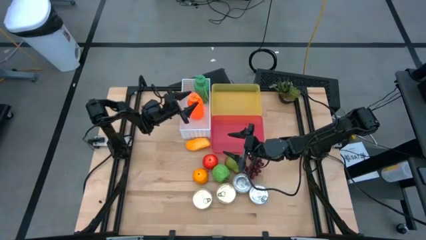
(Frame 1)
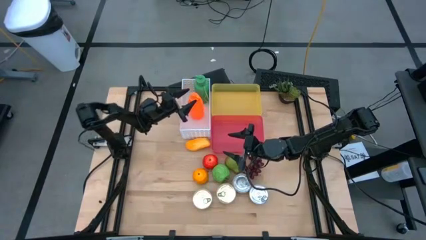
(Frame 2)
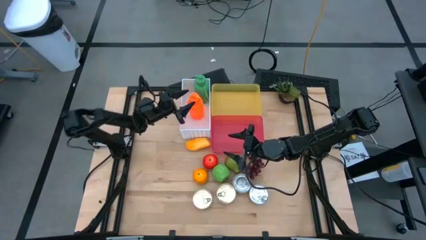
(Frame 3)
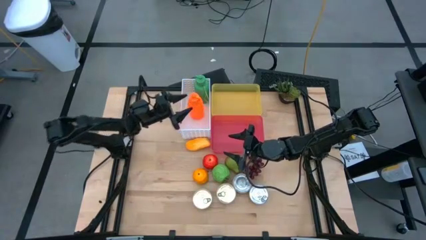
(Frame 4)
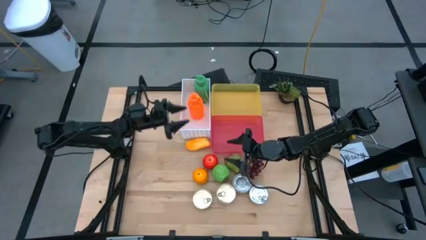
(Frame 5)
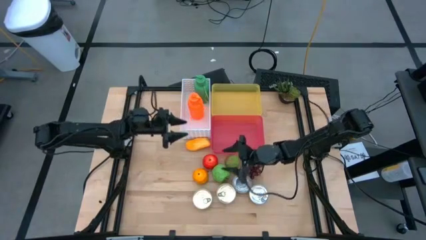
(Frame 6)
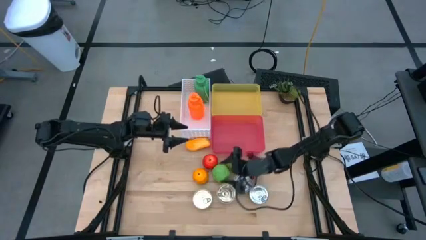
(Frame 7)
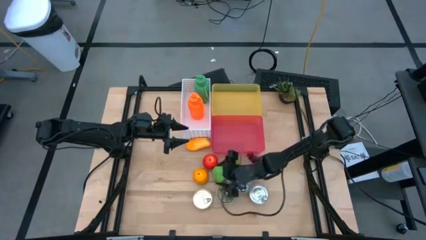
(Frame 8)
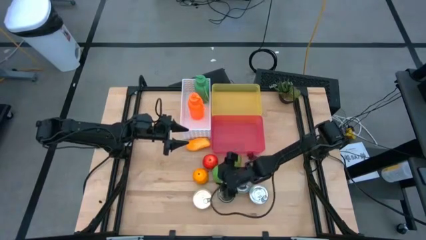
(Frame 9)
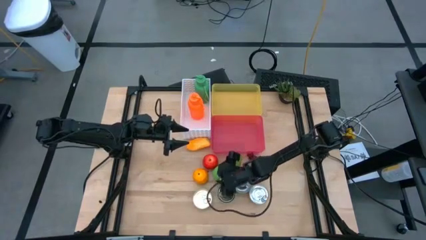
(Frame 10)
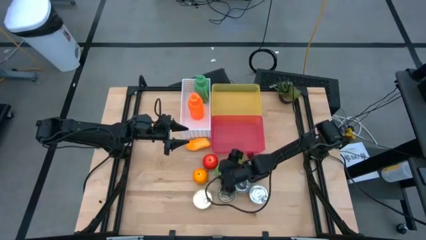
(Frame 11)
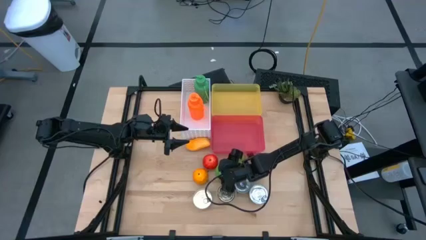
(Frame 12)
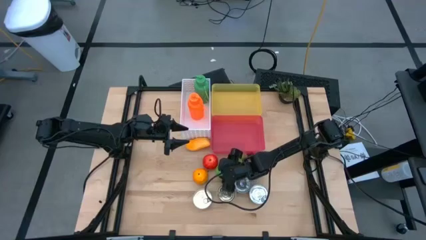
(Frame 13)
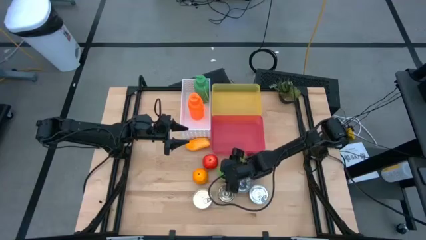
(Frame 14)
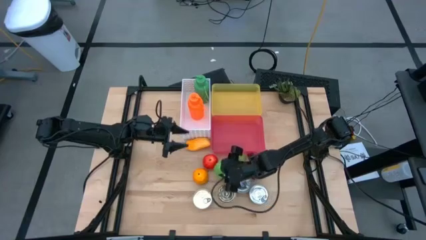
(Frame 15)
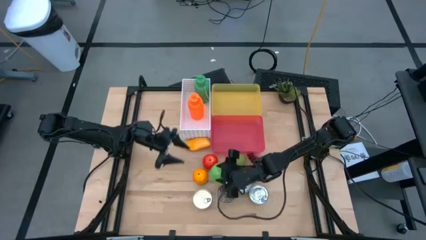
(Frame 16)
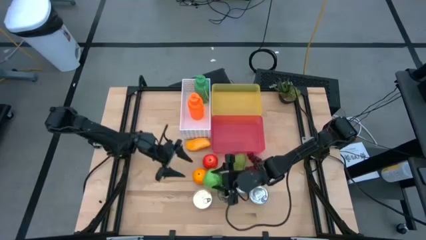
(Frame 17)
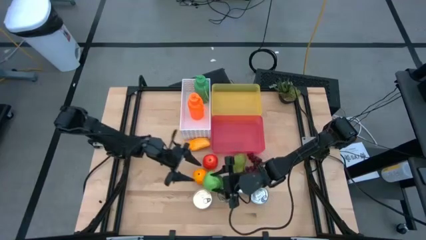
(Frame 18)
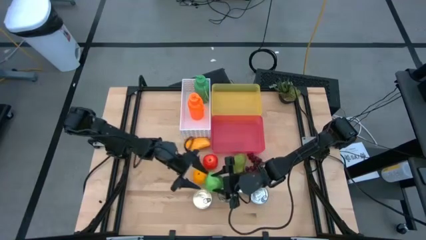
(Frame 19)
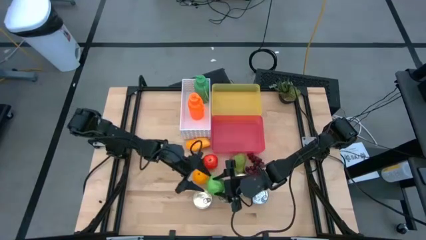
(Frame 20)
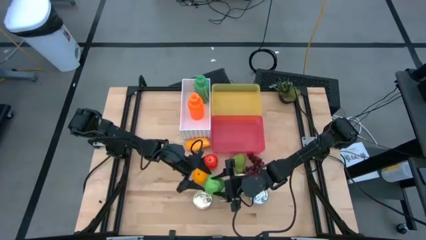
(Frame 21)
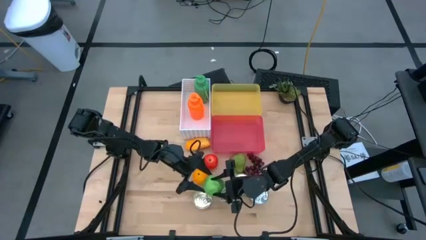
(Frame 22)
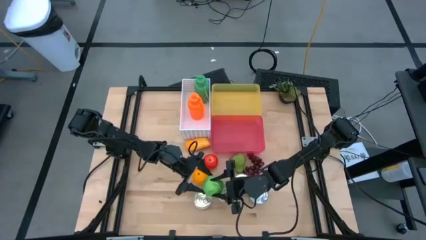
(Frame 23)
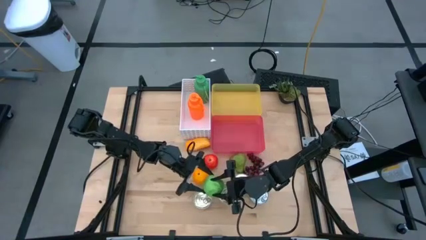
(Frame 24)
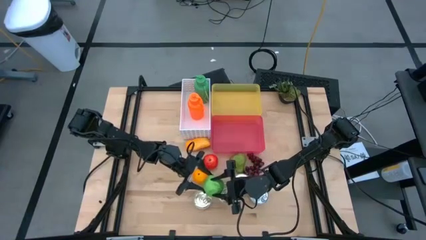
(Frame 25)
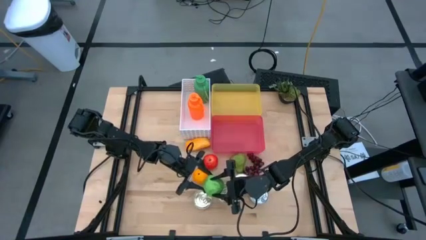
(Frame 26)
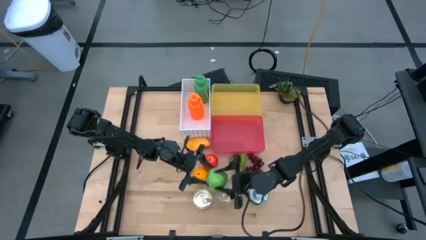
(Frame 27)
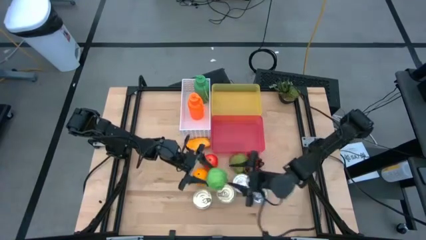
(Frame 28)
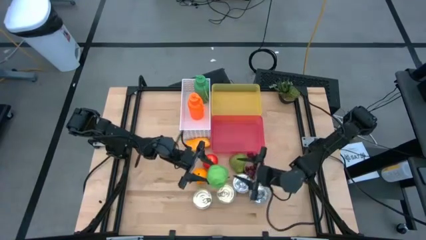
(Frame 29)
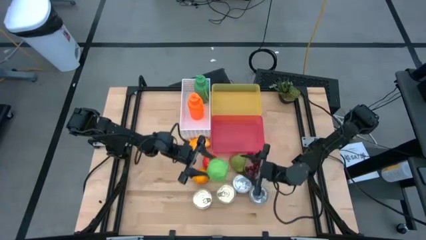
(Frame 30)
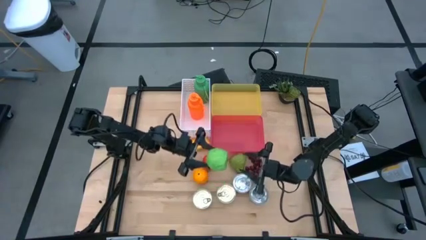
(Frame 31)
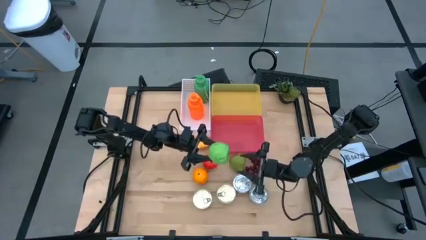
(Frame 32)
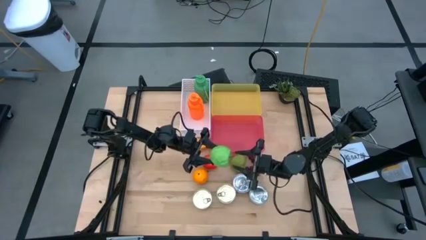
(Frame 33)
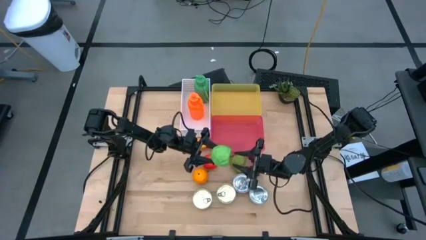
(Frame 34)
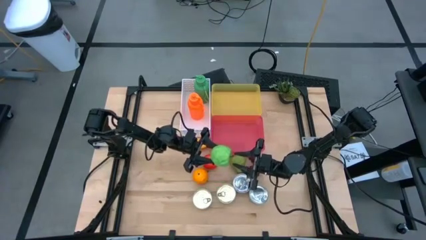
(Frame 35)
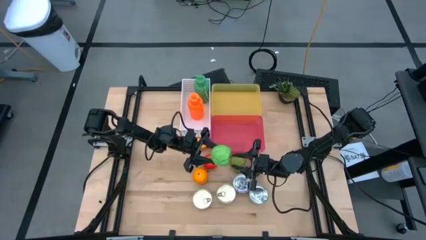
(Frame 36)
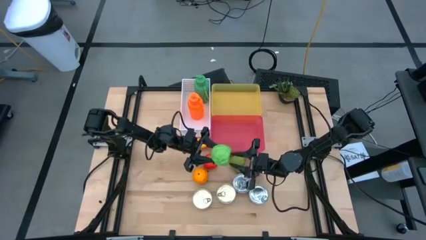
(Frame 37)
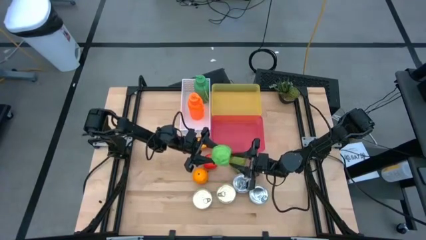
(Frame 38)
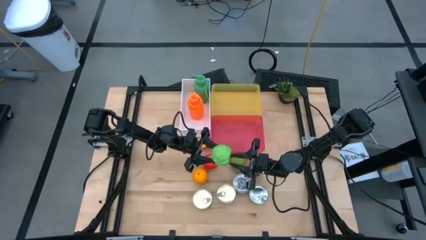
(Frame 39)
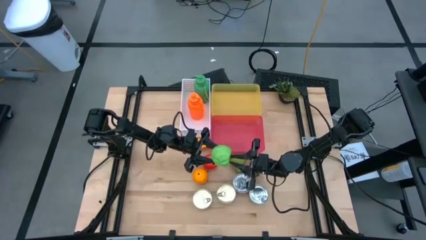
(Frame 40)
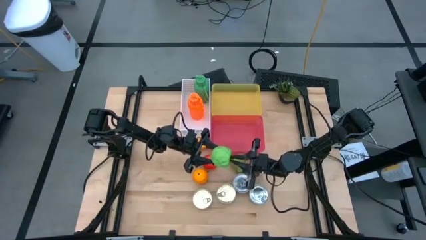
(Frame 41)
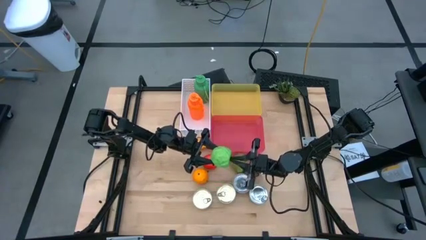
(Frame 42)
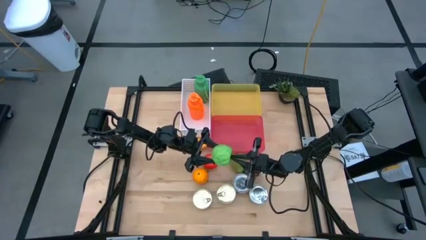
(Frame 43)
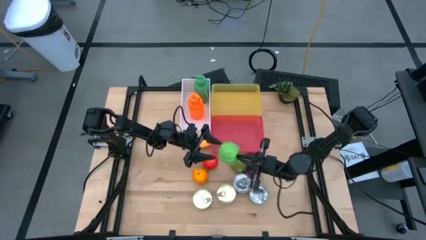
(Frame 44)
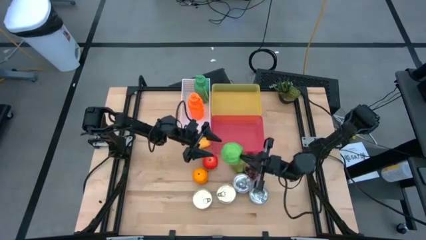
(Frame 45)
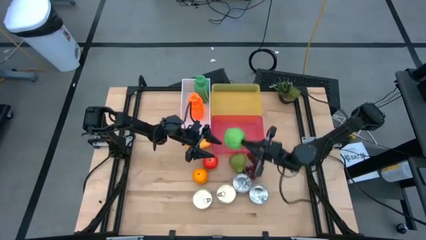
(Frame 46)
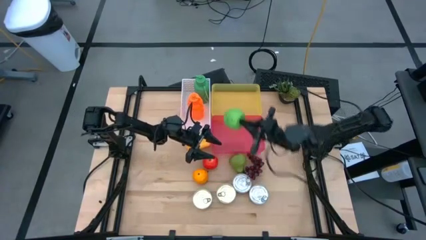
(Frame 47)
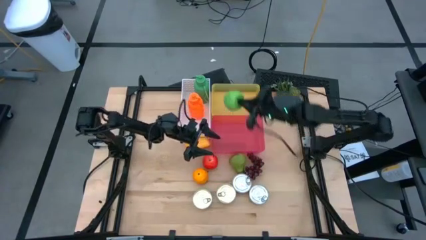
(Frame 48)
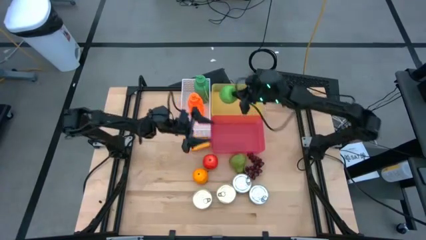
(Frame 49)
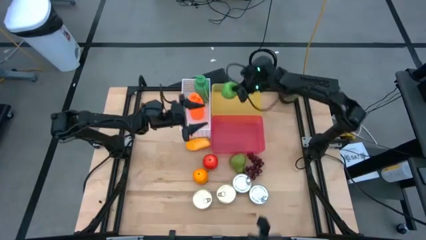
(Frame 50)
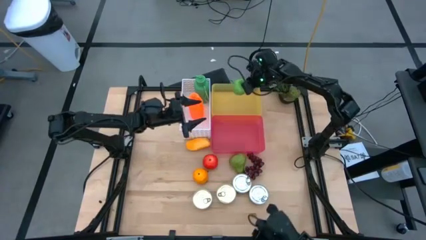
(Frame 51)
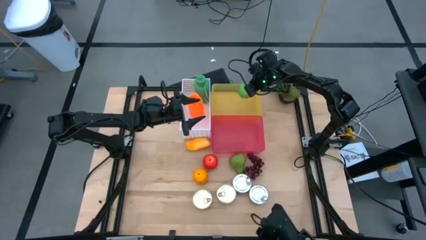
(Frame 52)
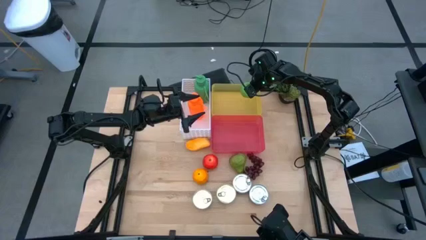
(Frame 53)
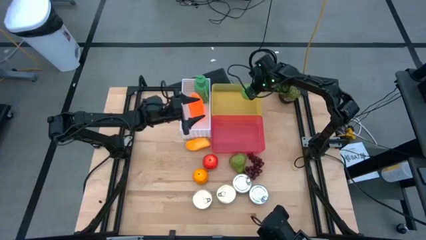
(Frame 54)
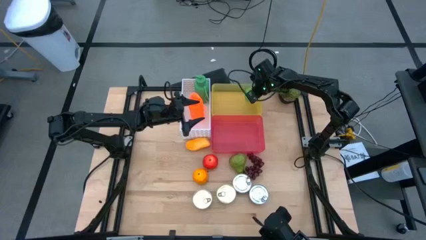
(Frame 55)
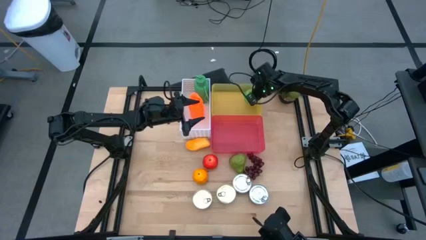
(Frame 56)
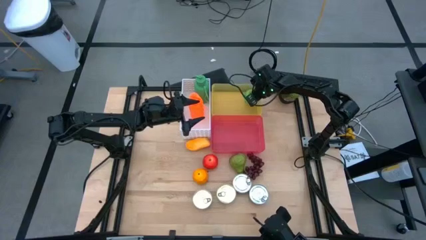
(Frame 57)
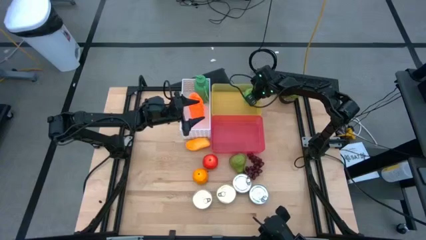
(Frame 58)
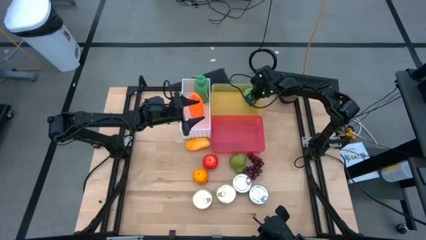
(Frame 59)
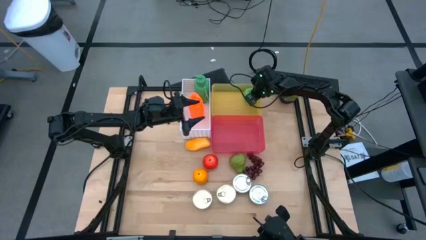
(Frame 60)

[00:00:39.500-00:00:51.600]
Task: Pick & Place Food Item
Put the green apple into the yellow bin
